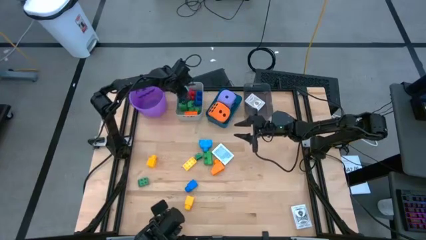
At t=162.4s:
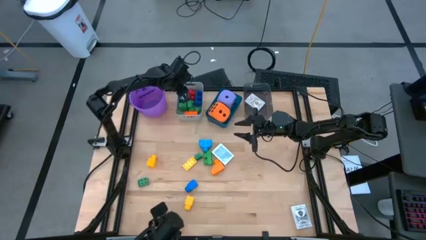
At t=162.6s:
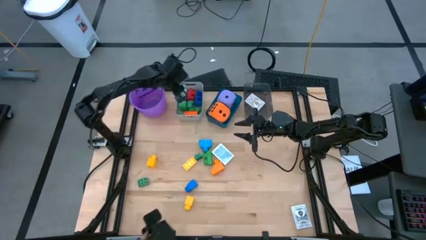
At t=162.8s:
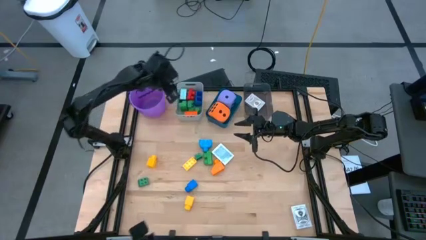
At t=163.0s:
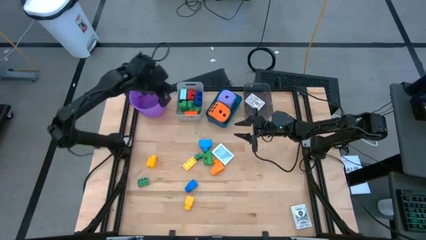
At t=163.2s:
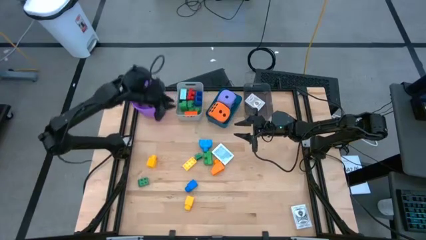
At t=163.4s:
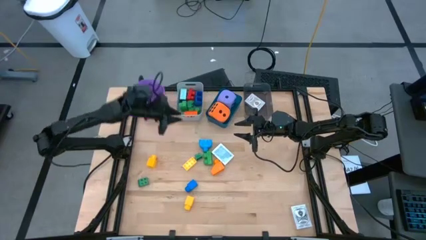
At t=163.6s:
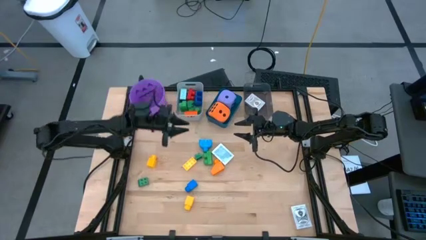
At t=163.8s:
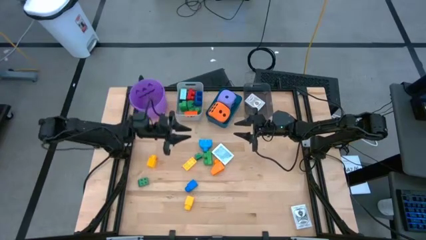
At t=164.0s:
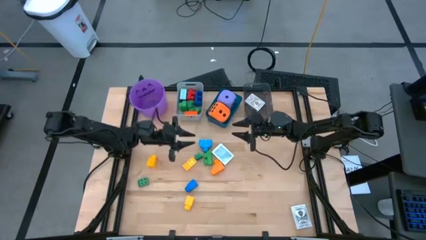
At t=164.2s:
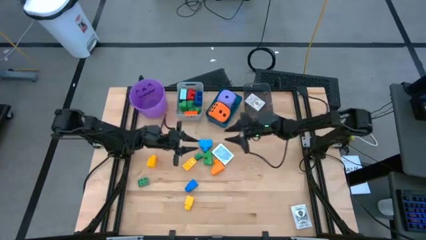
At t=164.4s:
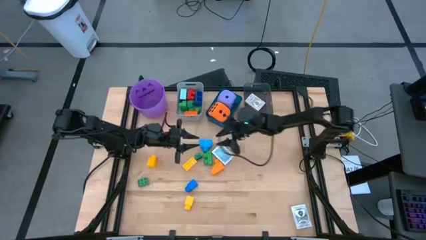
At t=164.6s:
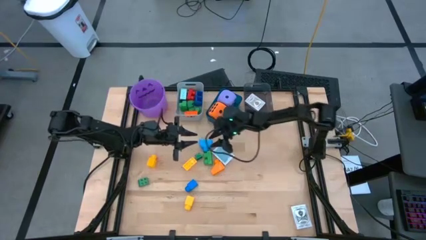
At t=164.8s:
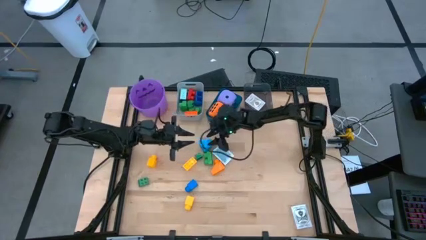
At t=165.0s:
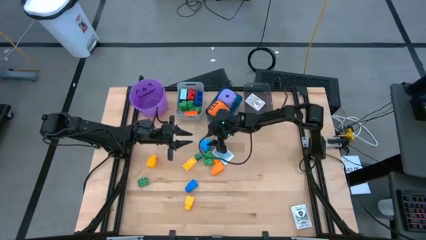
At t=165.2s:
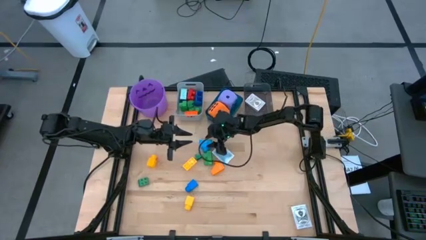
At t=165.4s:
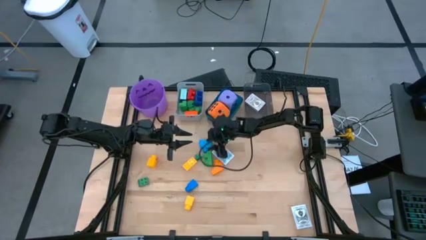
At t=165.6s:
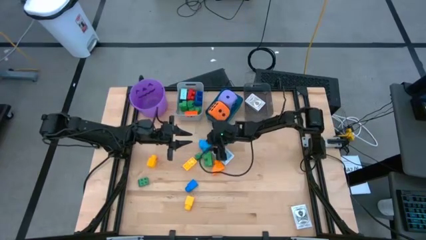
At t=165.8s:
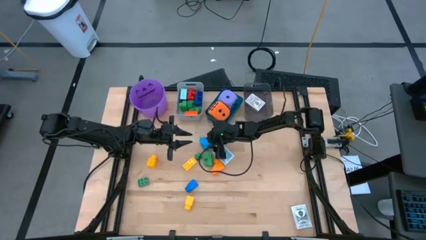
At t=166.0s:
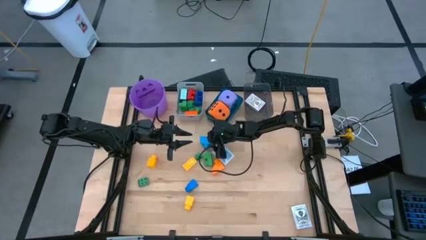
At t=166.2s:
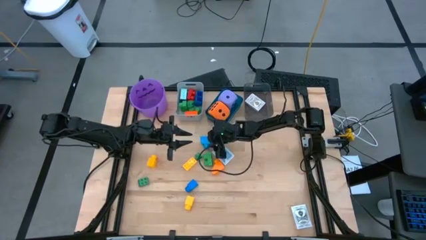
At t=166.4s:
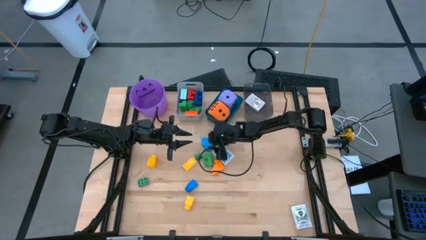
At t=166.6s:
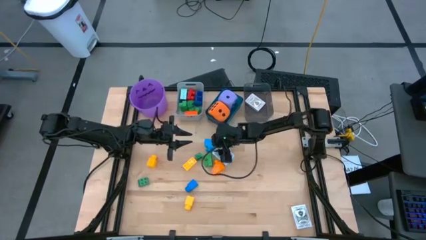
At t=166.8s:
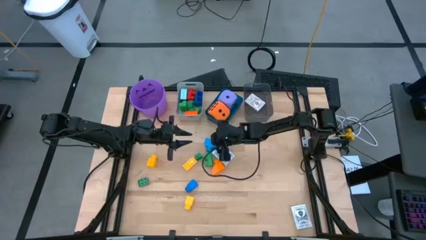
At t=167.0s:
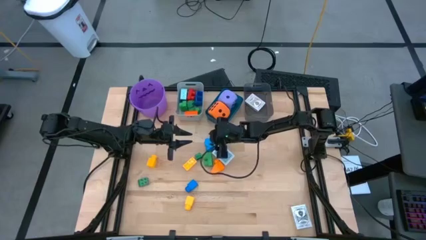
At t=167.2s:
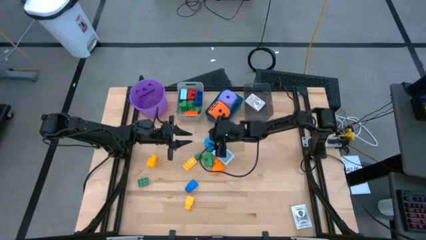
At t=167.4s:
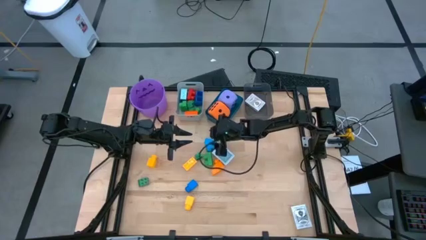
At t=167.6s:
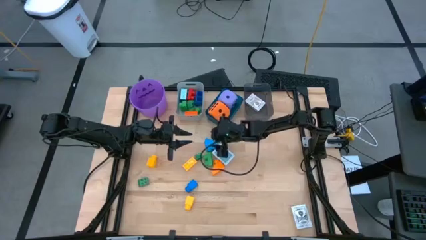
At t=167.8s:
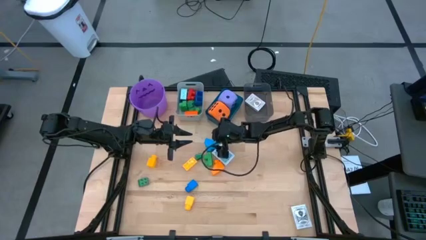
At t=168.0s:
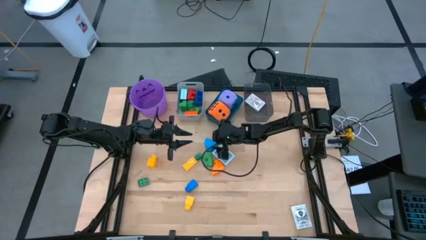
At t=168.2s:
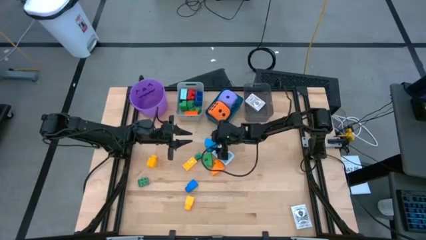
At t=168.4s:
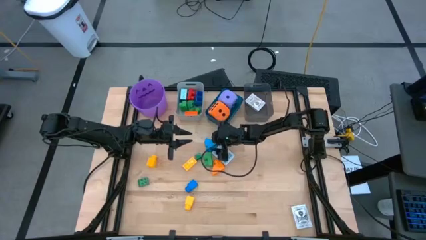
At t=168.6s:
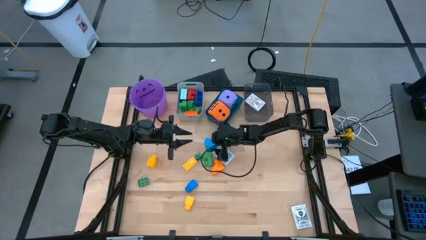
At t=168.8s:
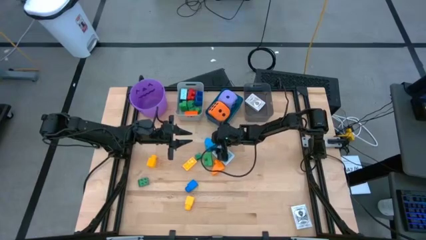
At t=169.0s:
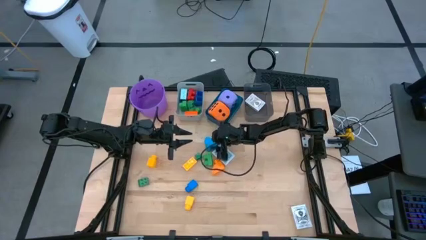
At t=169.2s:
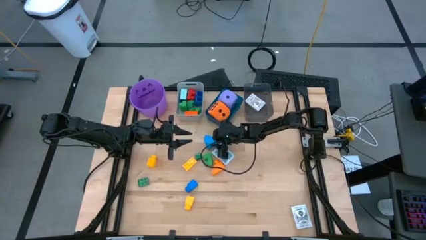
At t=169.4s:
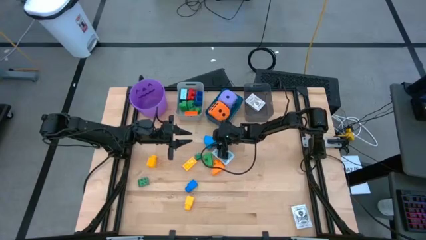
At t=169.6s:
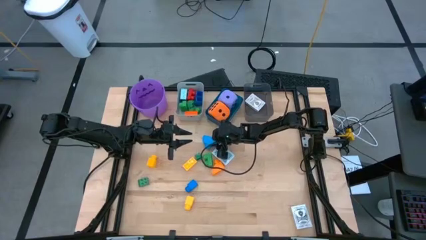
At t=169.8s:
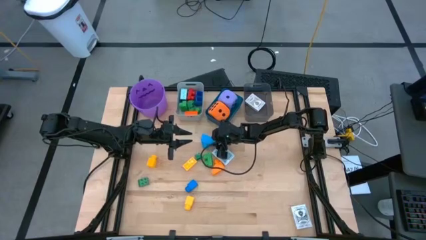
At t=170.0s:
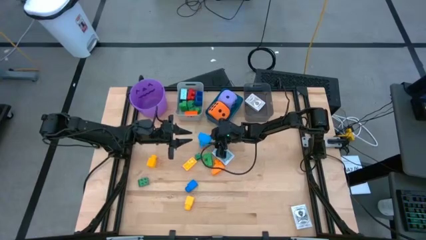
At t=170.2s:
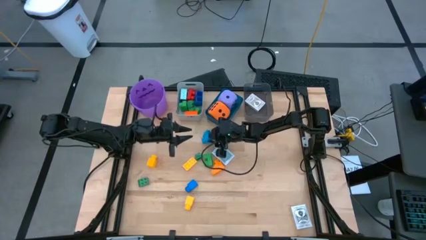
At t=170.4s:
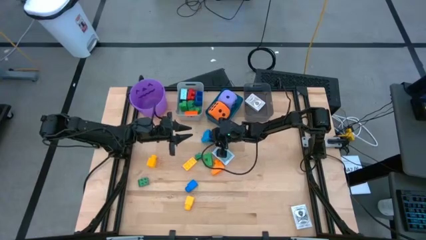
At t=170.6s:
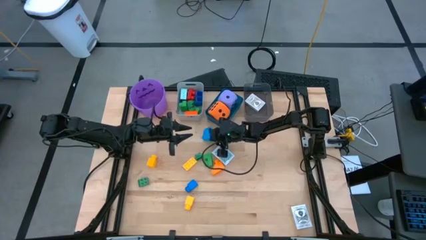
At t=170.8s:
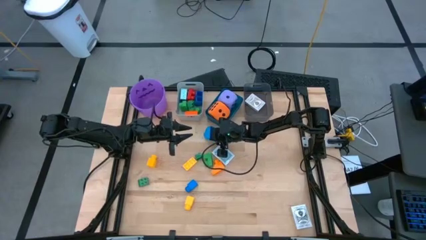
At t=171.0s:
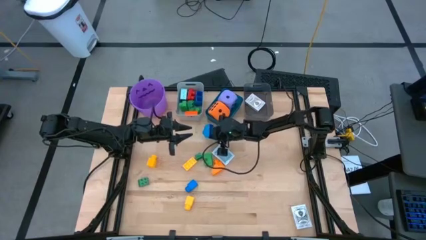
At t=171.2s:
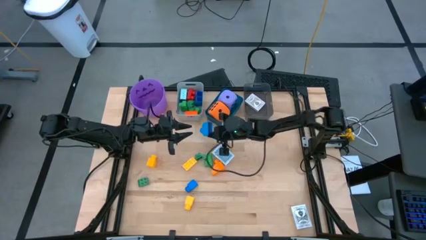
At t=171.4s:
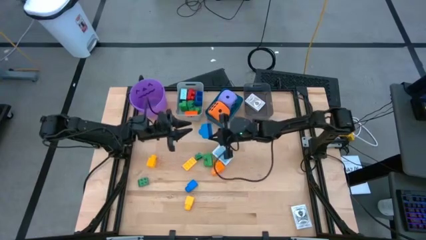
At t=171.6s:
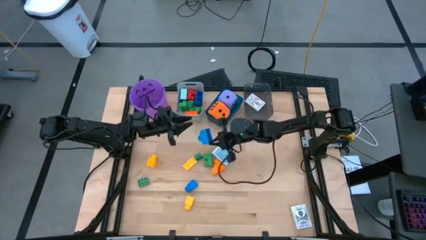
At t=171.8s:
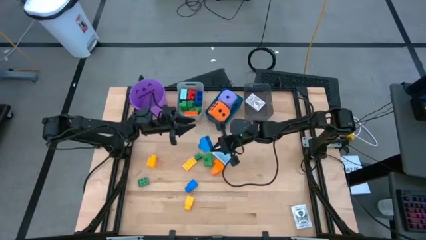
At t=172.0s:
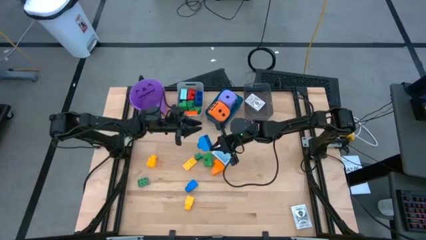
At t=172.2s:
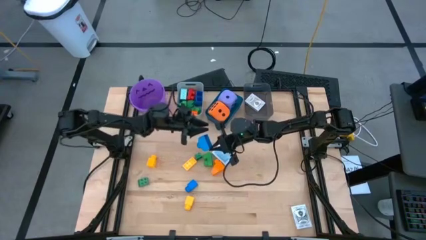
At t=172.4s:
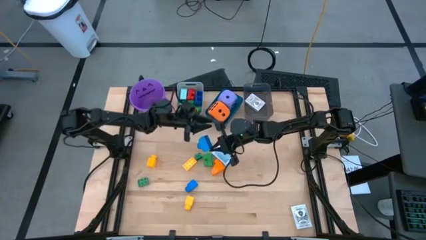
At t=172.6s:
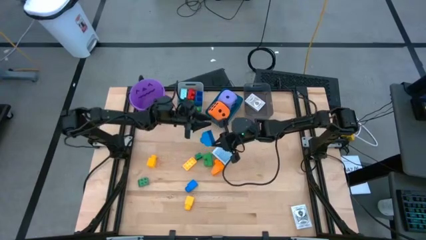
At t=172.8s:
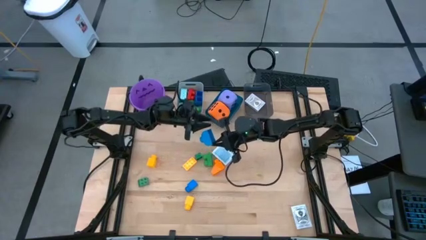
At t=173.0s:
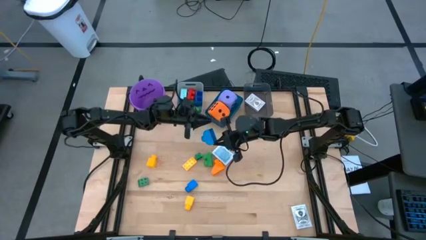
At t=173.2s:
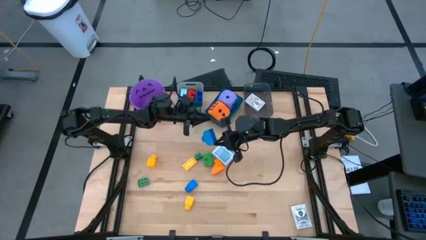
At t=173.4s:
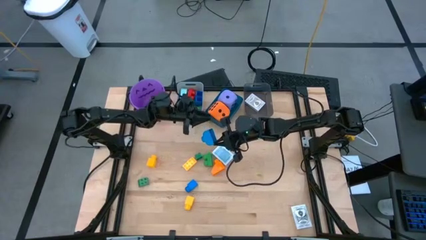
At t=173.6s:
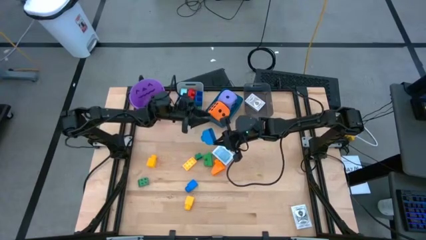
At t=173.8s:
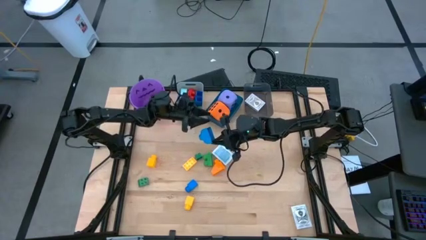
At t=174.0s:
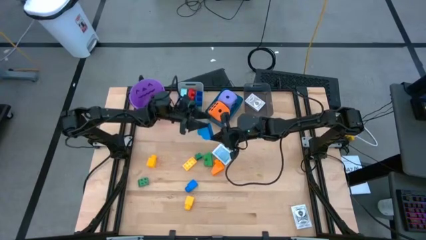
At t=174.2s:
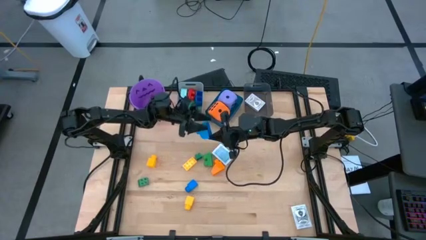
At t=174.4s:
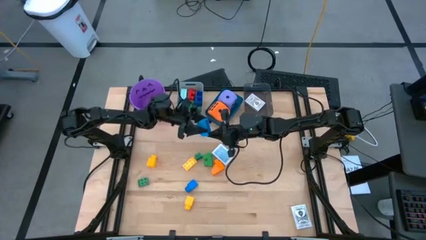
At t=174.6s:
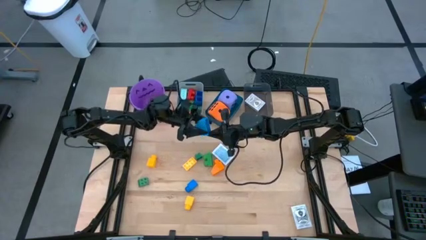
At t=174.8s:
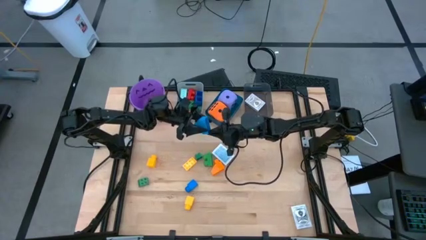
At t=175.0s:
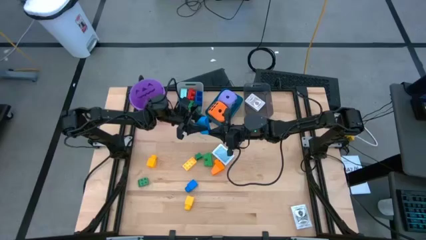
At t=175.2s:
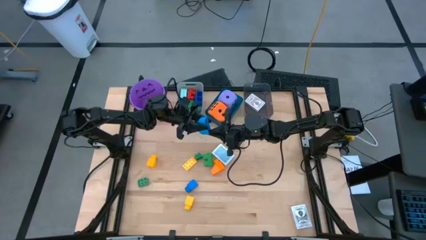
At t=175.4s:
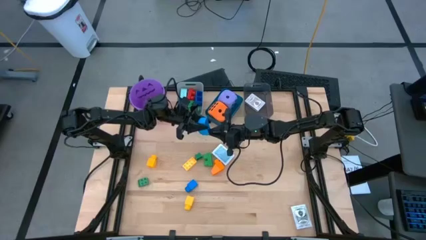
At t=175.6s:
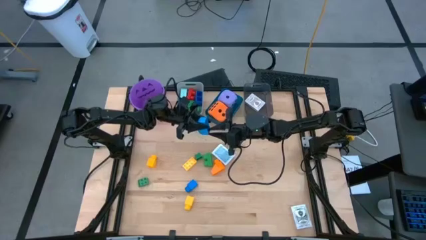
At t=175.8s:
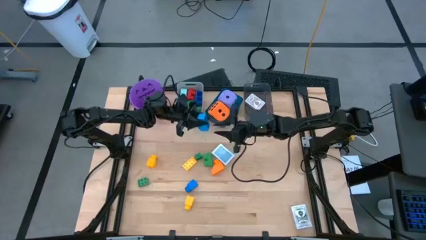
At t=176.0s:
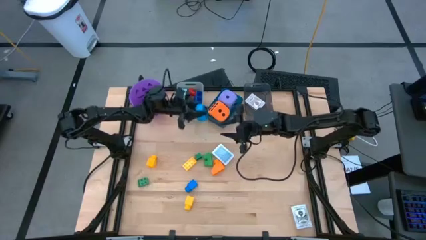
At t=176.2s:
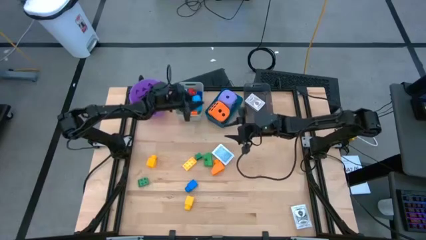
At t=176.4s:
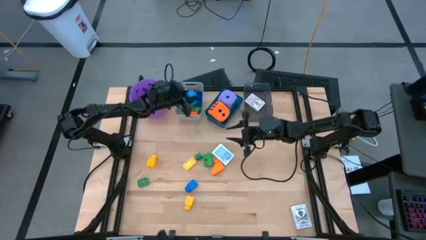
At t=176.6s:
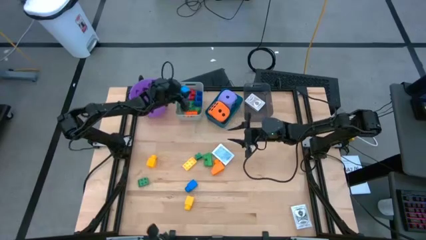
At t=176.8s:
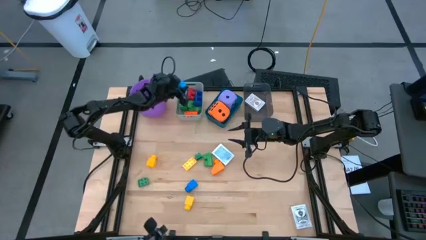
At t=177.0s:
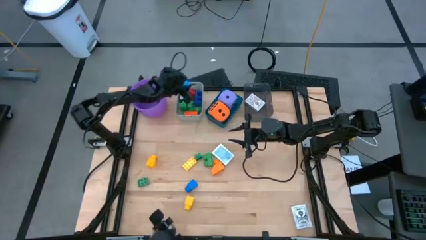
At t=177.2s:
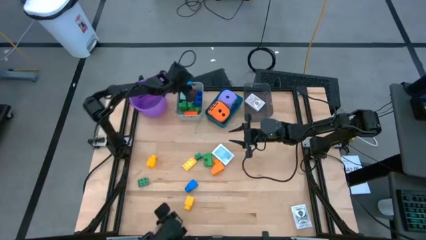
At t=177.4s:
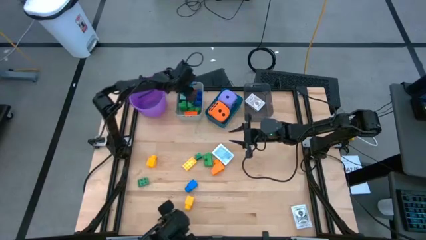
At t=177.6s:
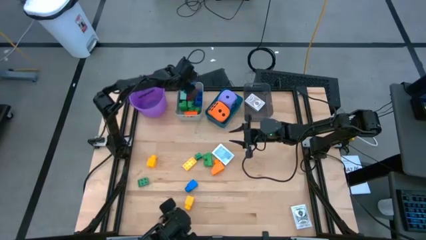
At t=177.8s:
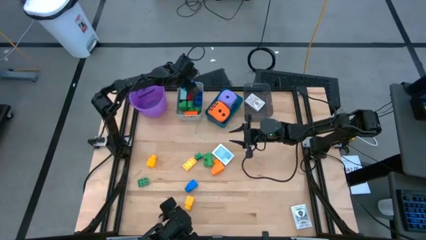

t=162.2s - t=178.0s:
Task: Pick & Place Toys
Put the blue game piece into the gray bin

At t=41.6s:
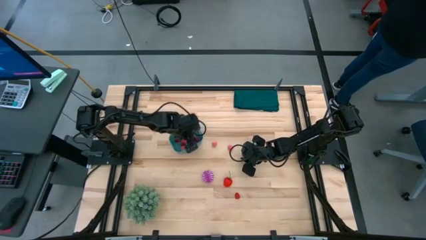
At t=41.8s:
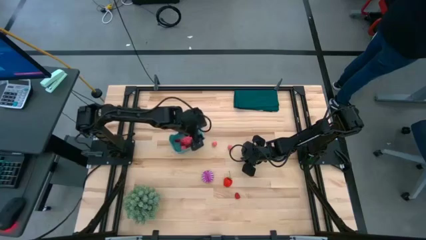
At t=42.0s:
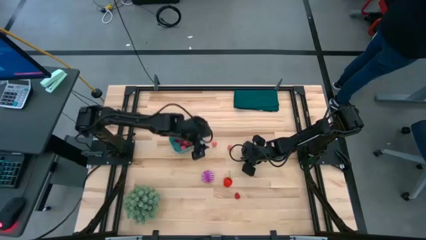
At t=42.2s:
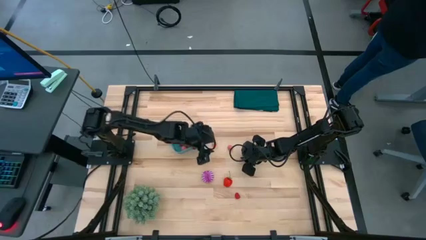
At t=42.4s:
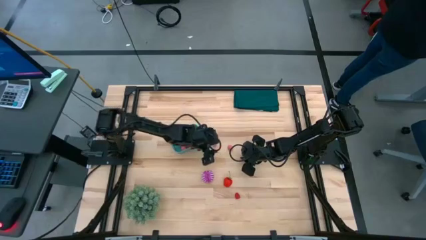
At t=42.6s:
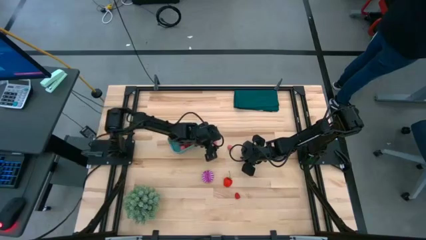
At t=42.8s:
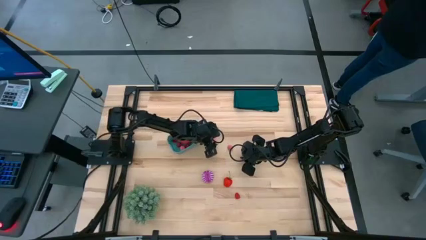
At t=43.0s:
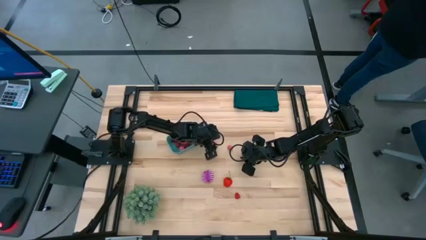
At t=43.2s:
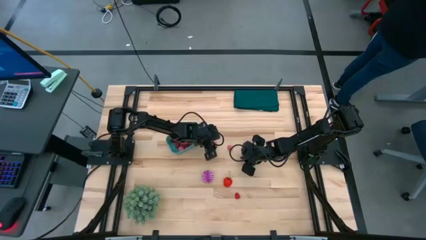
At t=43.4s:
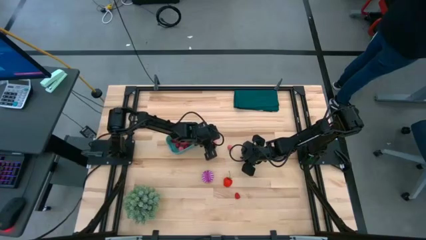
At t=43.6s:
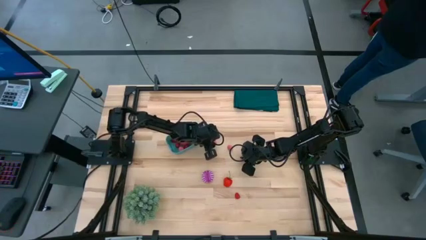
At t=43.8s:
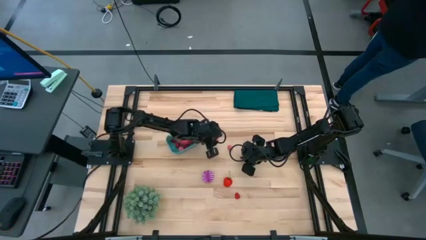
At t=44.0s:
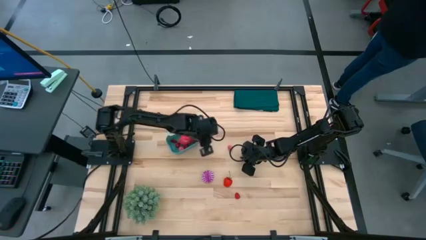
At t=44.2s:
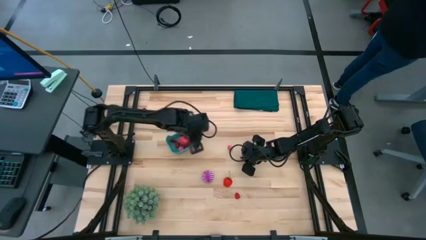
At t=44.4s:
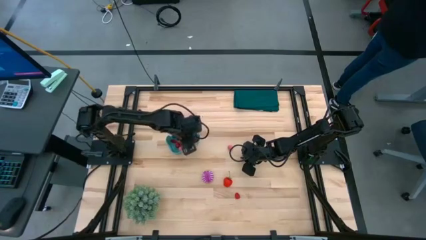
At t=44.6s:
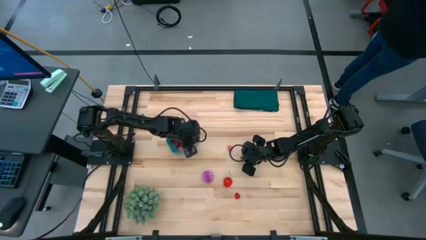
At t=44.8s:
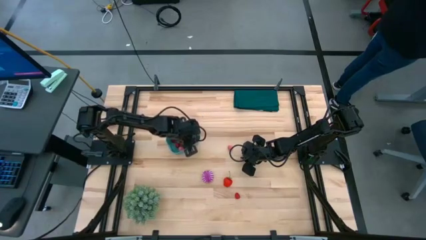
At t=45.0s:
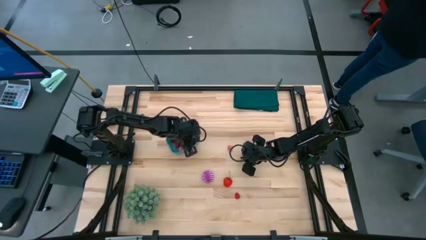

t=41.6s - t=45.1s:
Task: Pick and placing Produce into tupperware
Put the pink peach into the blue bin
